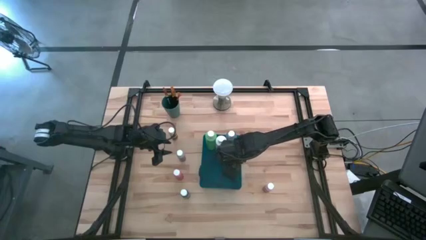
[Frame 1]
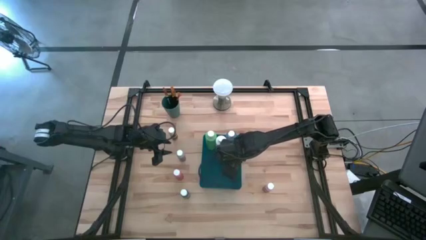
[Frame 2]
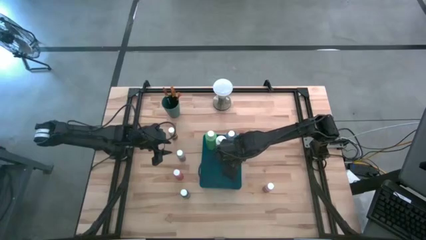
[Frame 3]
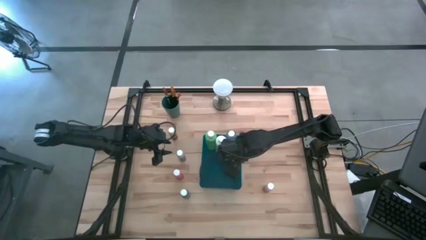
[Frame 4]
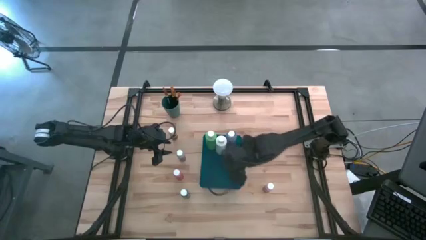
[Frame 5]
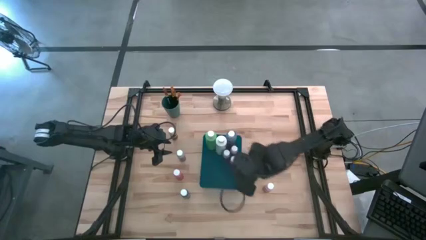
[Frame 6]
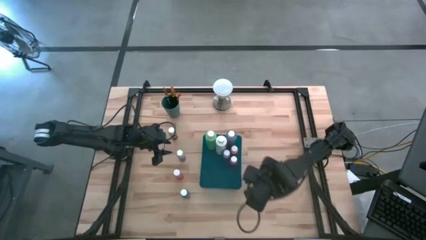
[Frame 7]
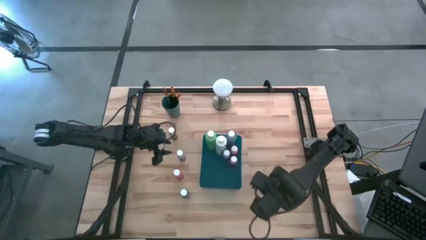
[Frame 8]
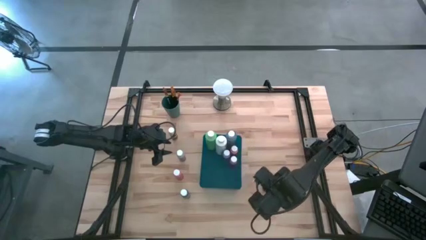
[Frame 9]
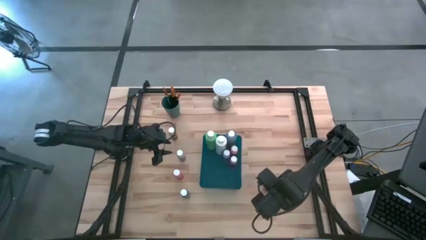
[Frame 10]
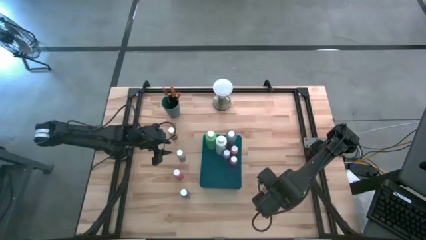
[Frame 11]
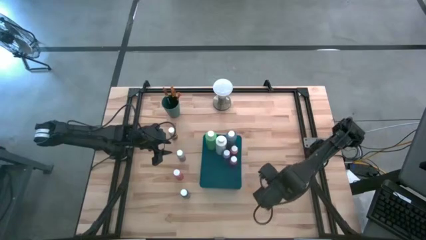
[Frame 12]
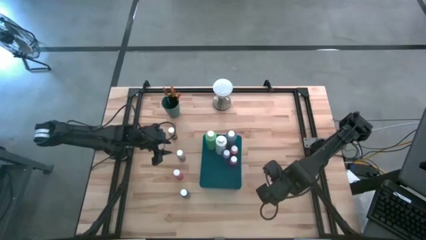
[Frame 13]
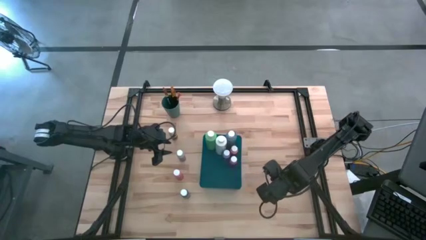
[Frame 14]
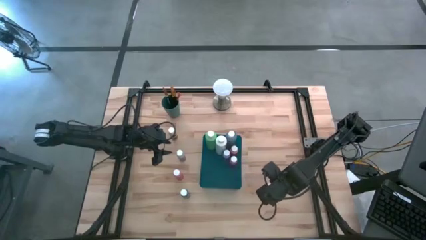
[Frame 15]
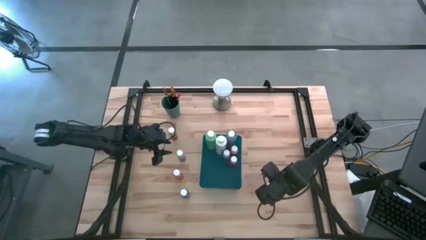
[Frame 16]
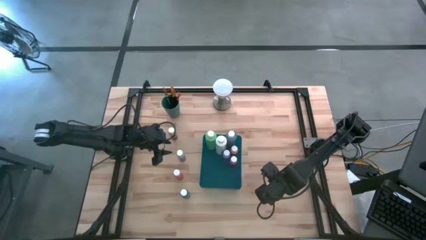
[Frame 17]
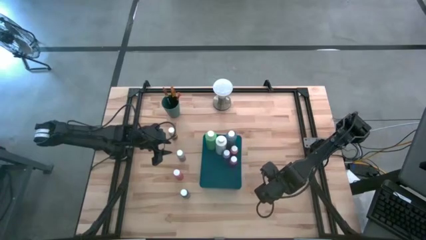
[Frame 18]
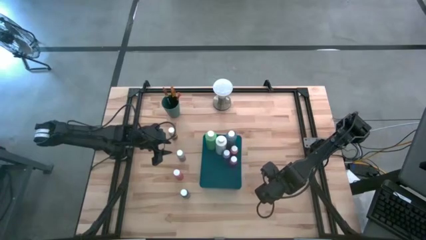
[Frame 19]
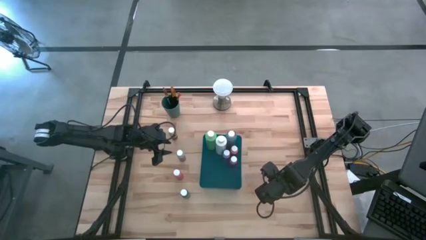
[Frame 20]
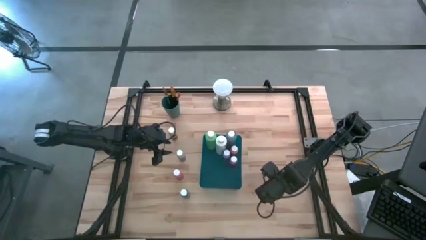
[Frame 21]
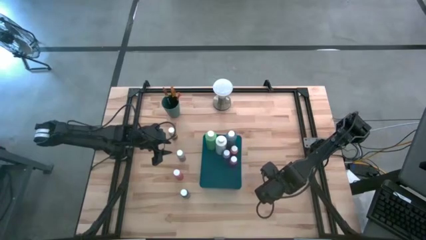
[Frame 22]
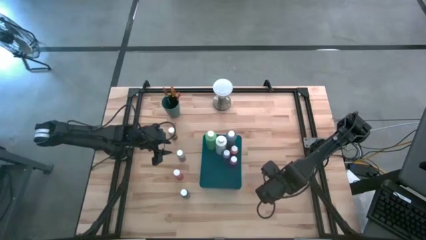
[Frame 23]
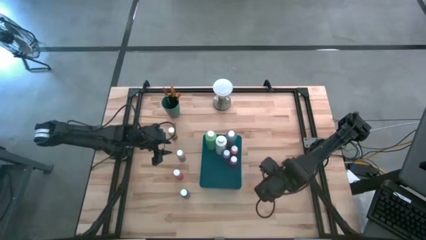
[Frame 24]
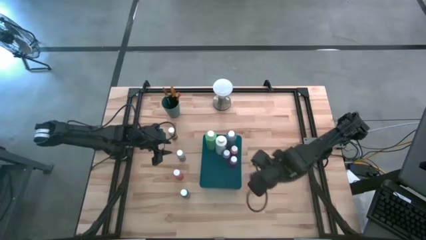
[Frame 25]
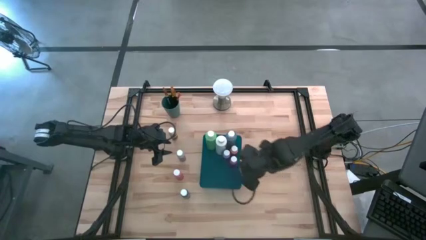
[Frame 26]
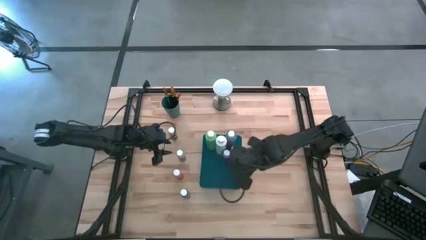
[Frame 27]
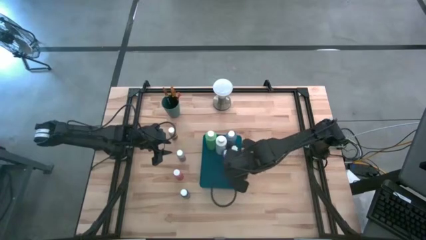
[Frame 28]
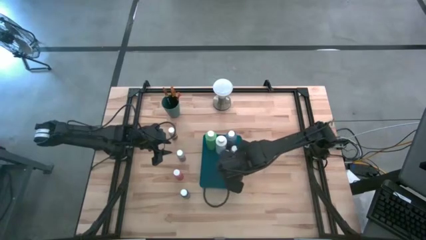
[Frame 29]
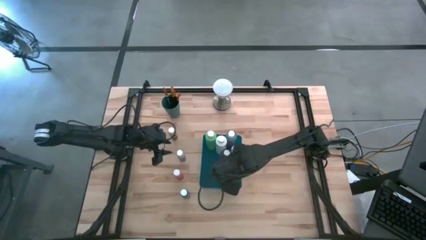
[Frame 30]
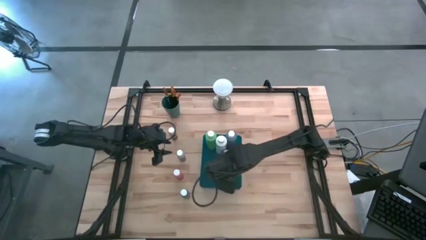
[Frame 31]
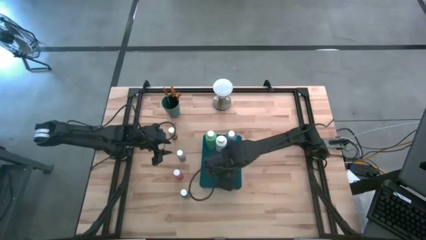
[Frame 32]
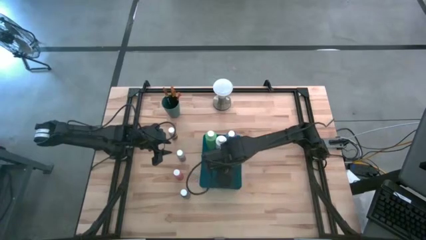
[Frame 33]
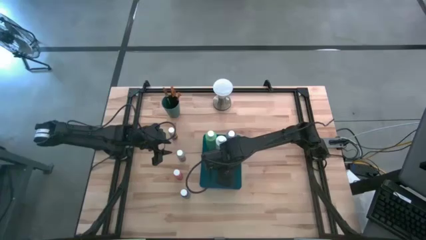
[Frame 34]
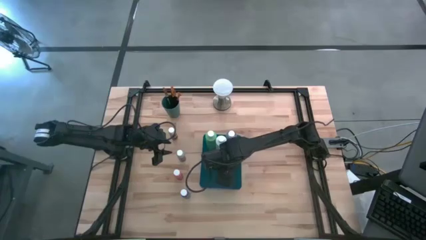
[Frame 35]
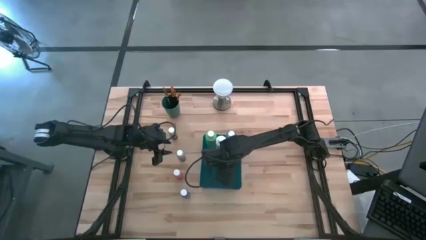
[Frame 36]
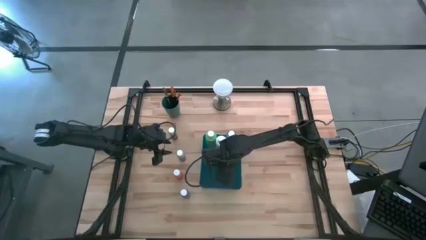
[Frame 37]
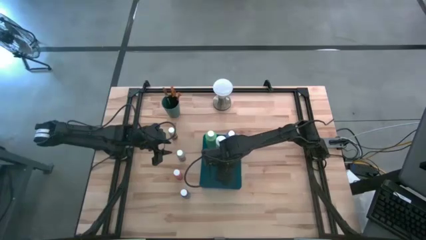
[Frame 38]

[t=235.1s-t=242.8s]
Task: Pick & Place Paint Supplies
Put the pink paint bottle into the blue bin

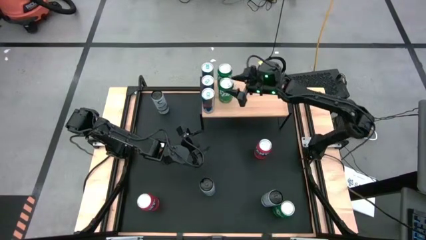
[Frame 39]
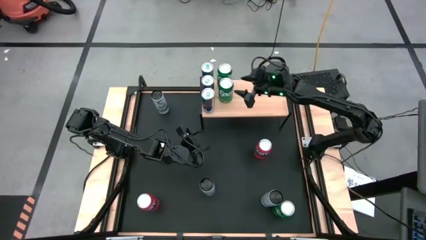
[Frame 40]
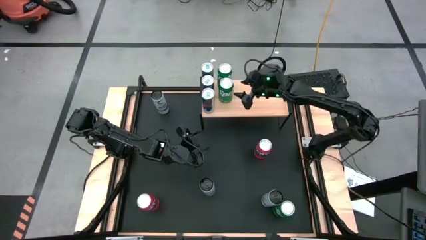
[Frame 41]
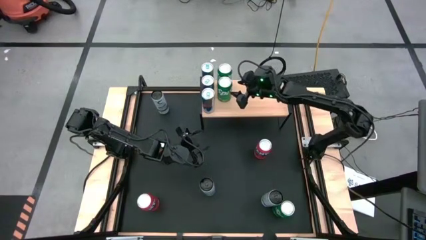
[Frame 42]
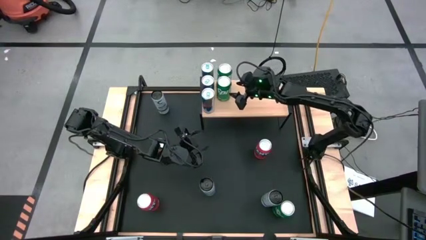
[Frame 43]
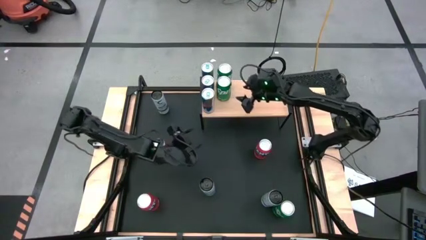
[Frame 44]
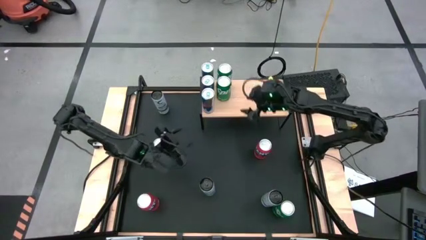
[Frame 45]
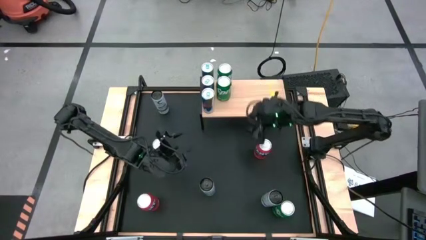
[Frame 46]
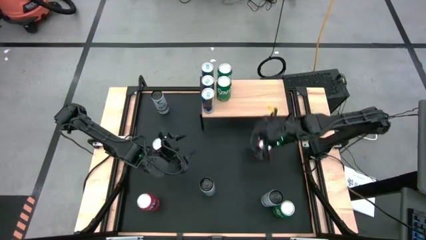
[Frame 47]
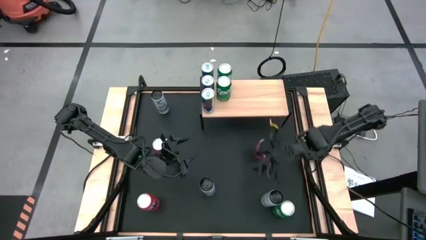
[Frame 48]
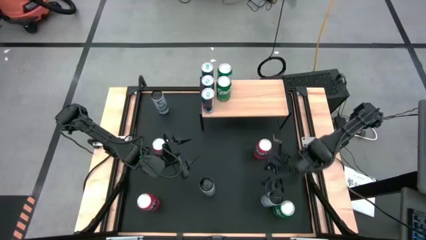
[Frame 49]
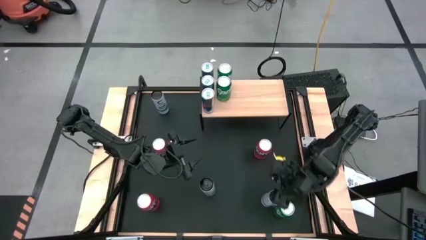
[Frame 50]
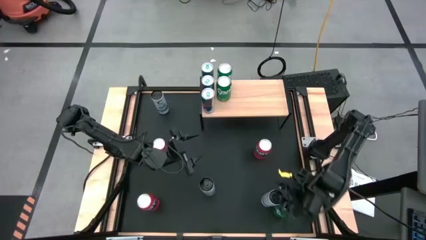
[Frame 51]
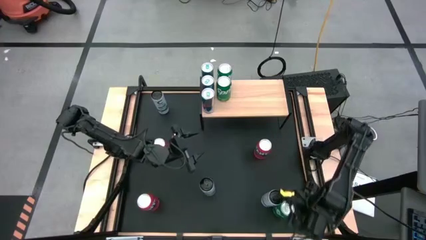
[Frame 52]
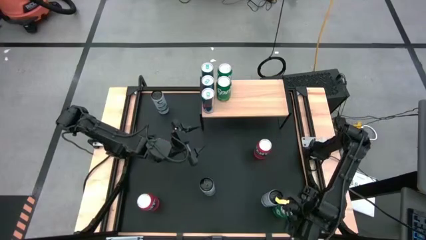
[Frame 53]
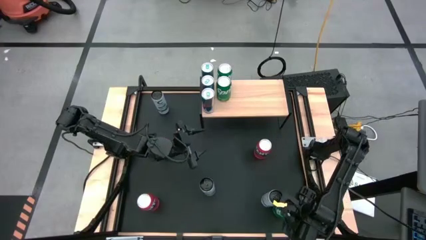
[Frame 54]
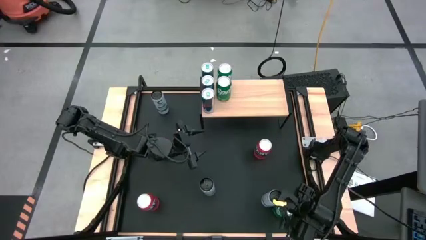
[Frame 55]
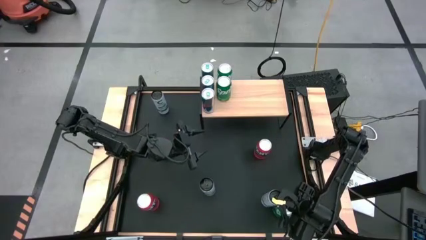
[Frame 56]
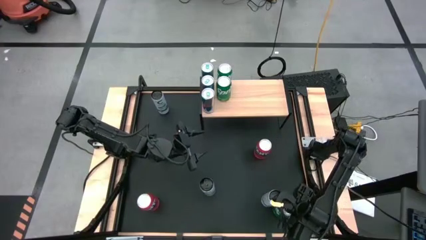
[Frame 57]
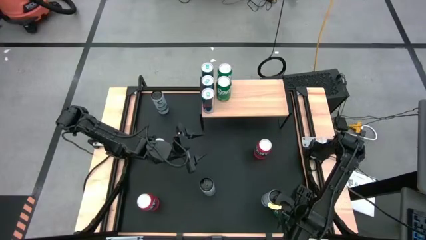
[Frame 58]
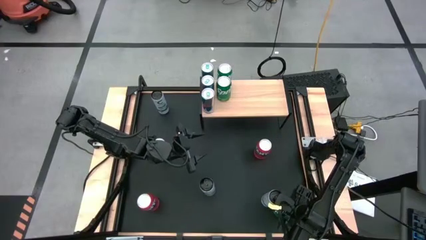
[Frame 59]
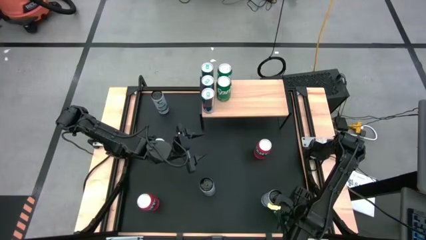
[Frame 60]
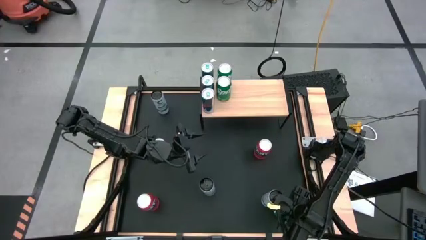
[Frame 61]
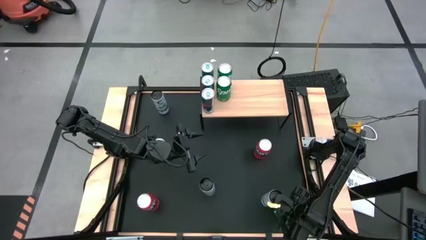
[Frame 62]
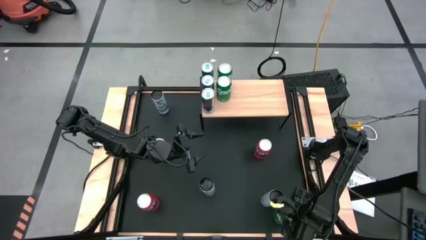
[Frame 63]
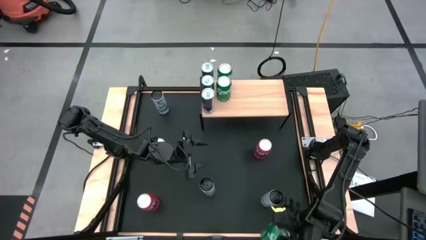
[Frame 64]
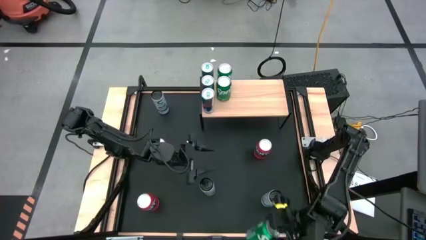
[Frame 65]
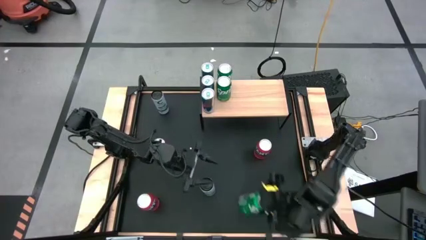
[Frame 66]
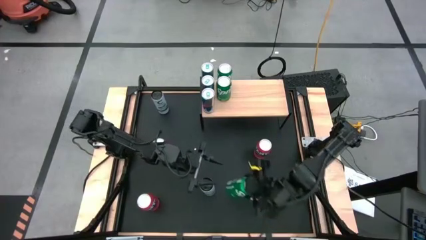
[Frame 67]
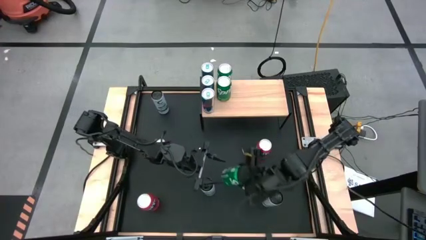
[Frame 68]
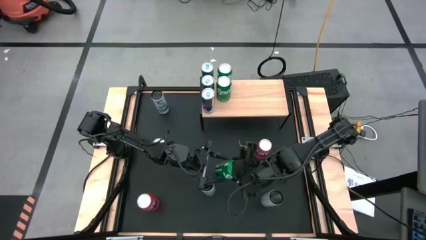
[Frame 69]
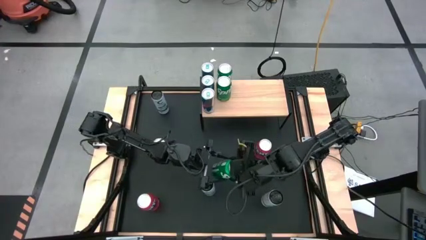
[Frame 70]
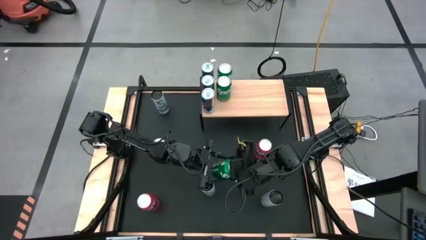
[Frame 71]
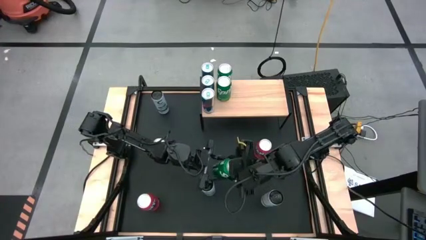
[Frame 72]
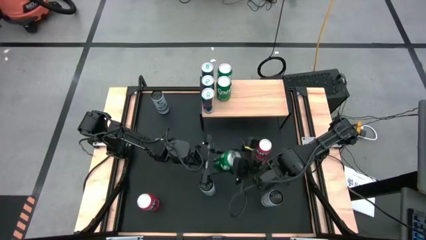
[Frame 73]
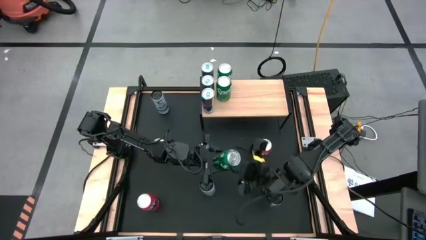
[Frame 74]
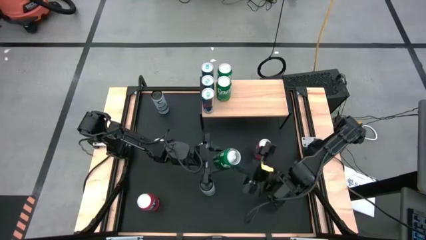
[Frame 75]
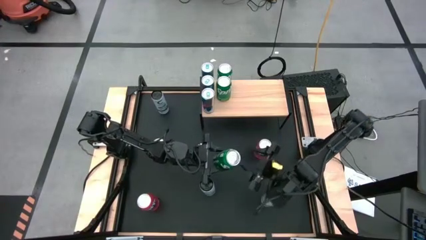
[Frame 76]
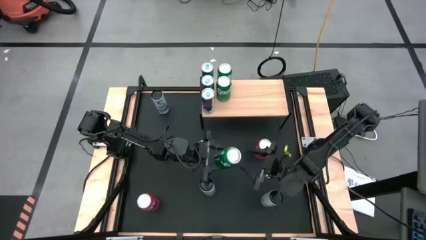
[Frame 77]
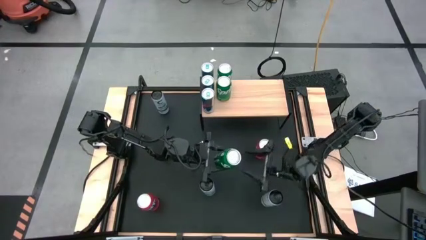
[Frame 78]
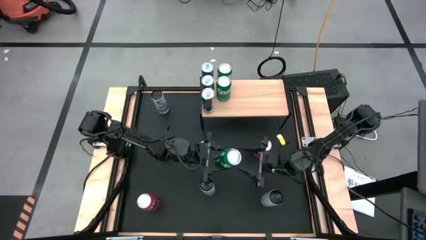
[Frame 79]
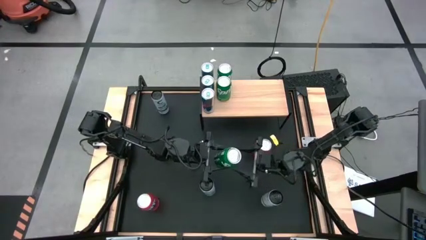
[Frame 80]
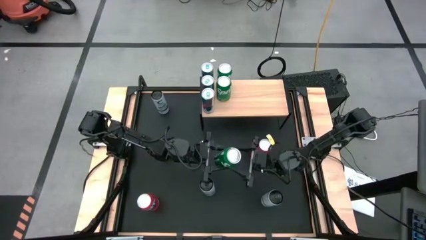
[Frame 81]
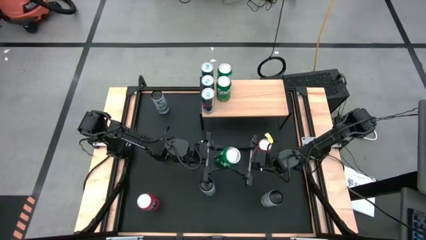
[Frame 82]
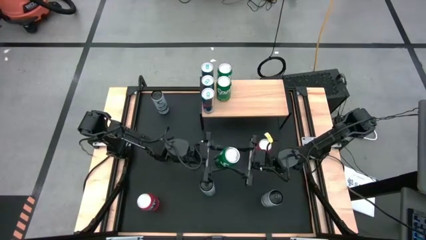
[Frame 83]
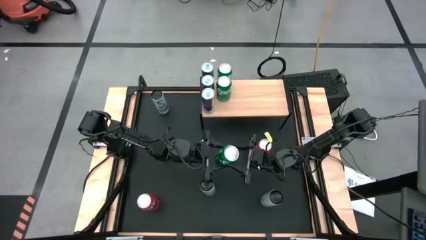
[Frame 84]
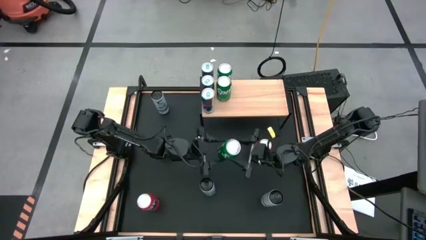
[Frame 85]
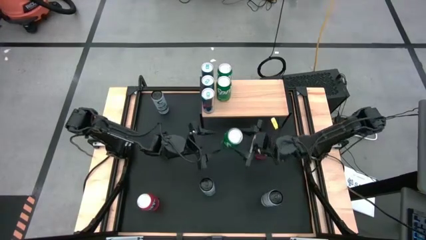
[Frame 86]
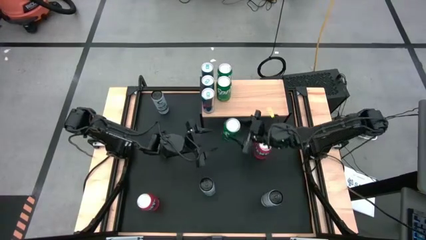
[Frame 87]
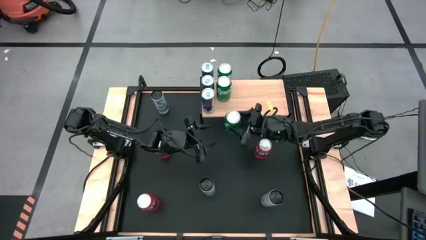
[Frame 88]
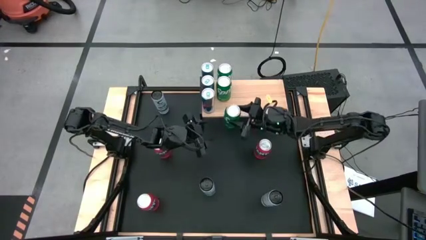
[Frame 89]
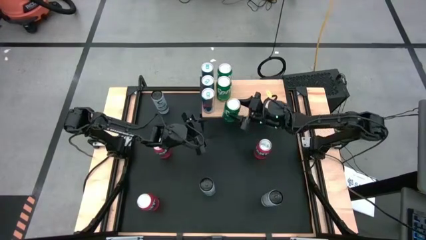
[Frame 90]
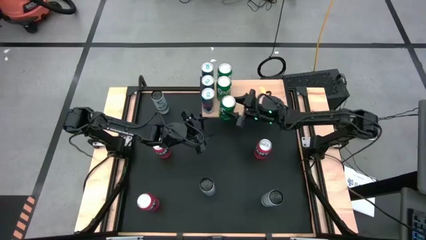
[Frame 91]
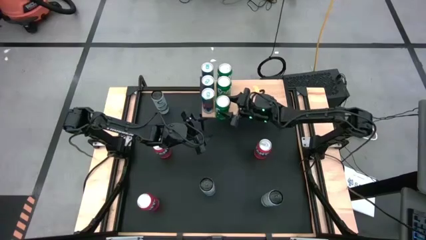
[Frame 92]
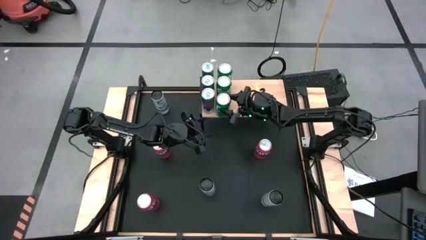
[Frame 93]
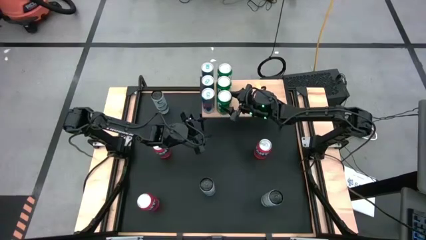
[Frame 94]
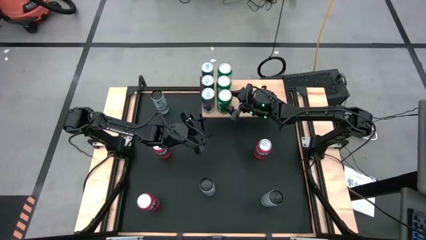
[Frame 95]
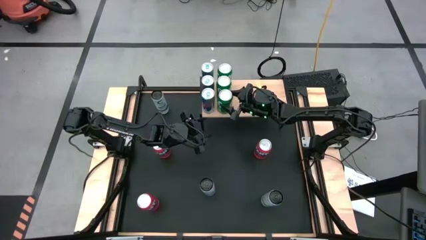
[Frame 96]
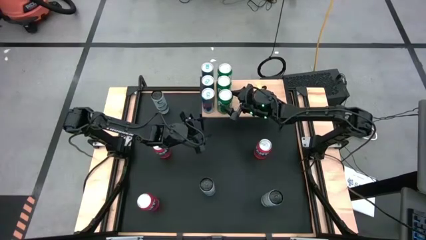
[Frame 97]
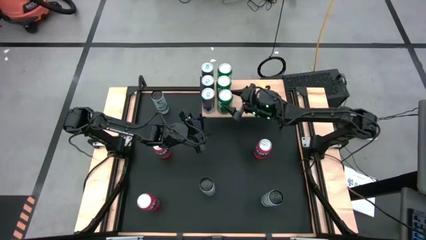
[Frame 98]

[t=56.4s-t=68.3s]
Task: Place canned beverage on shelf
Put the green soda can on the shelf aligned with the other green soda cans
